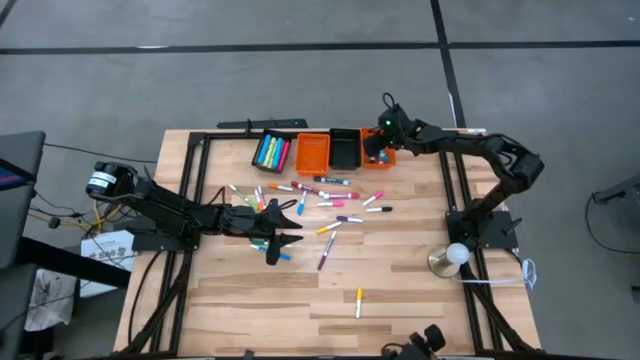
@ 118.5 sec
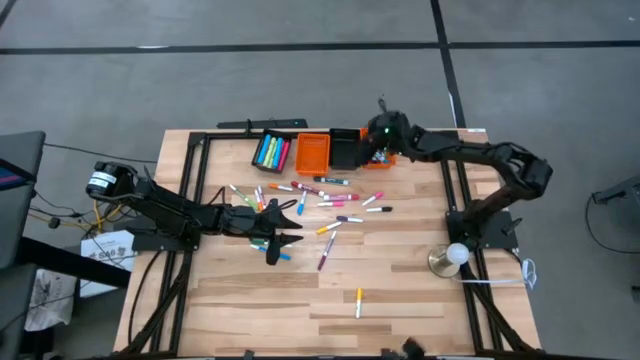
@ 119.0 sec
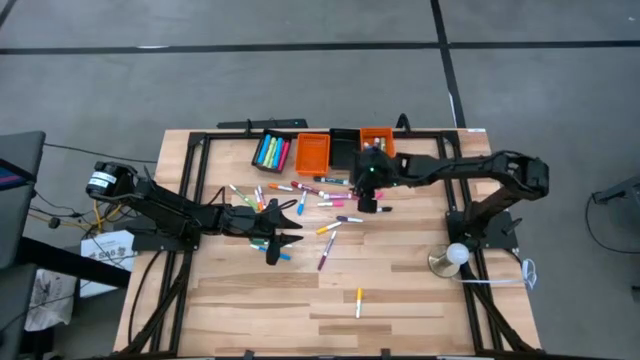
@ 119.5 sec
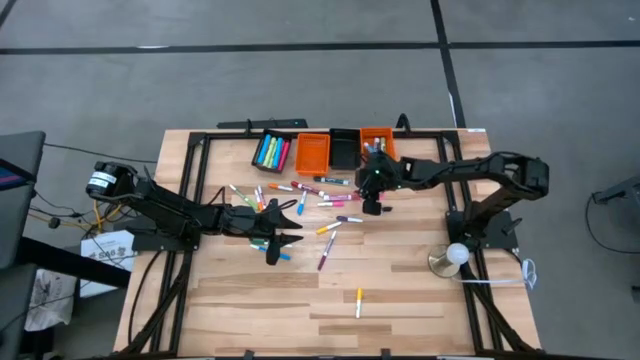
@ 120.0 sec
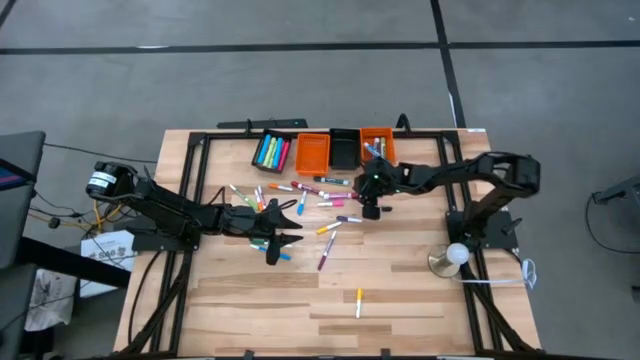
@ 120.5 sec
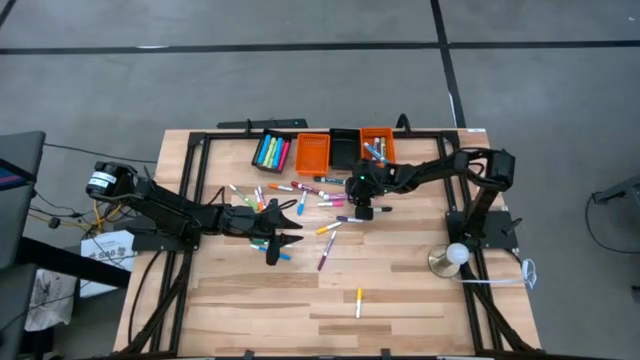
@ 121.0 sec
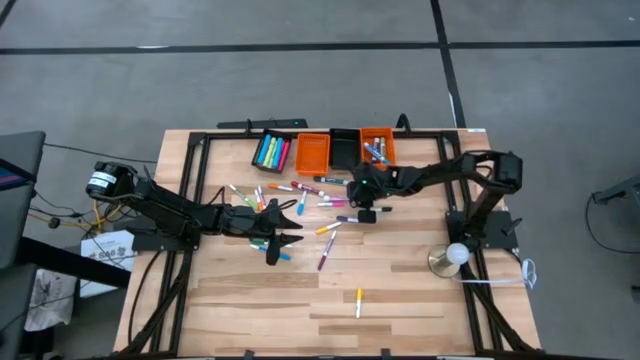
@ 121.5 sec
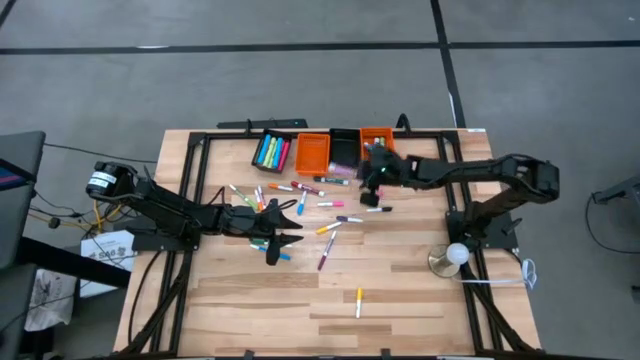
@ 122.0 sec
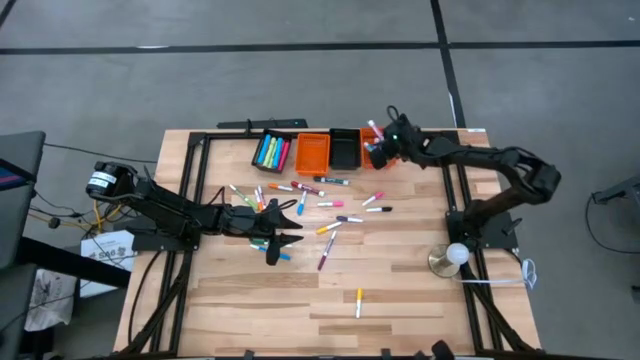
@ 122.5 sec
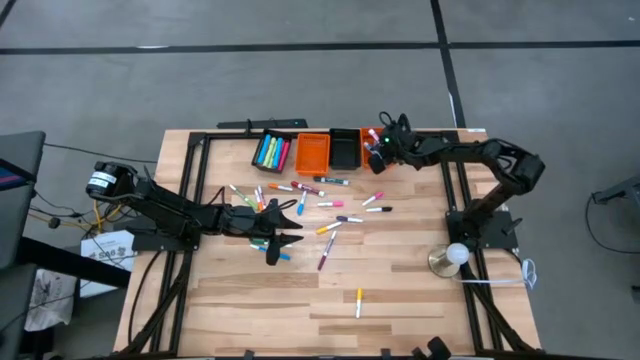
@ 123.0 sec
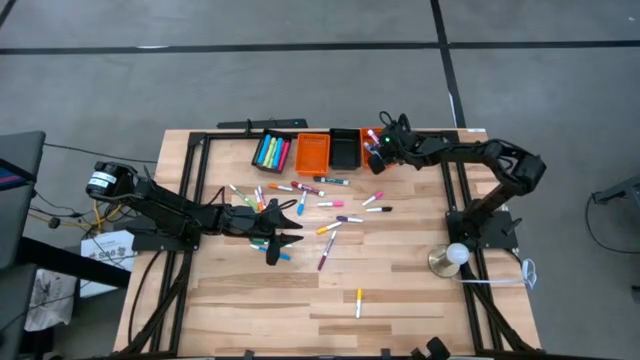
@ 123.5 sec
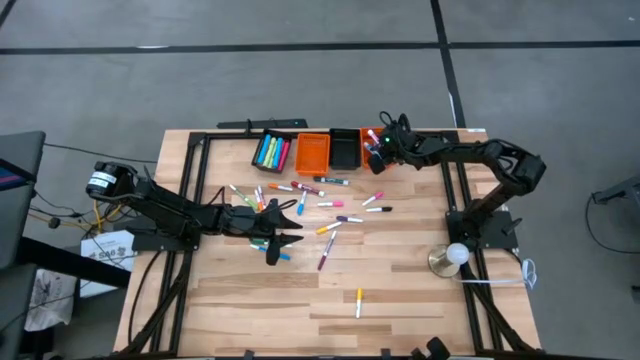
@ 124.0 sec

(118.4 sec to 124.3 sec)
Task: Pick & Place Markers
Put the big pink marker pen into the right orange basket

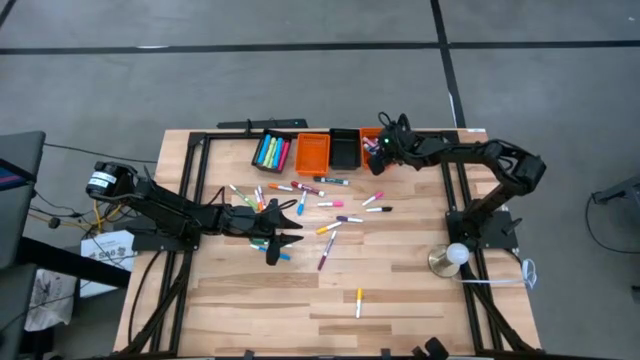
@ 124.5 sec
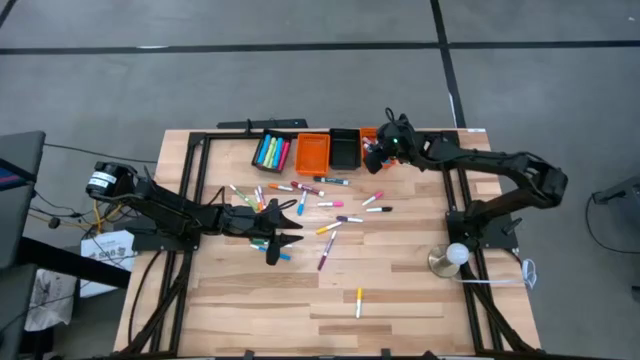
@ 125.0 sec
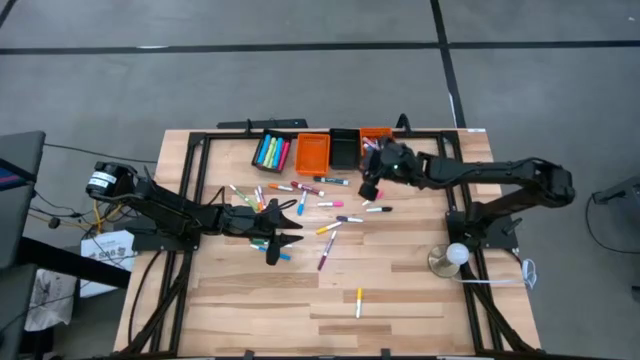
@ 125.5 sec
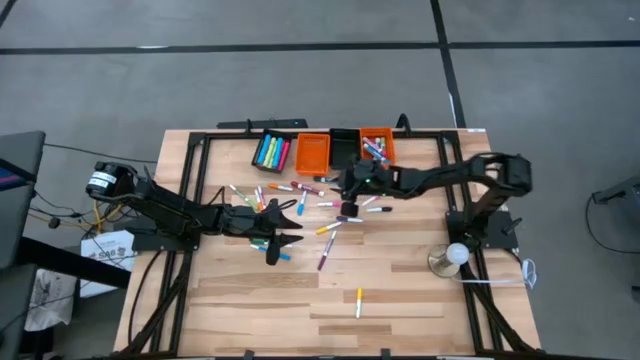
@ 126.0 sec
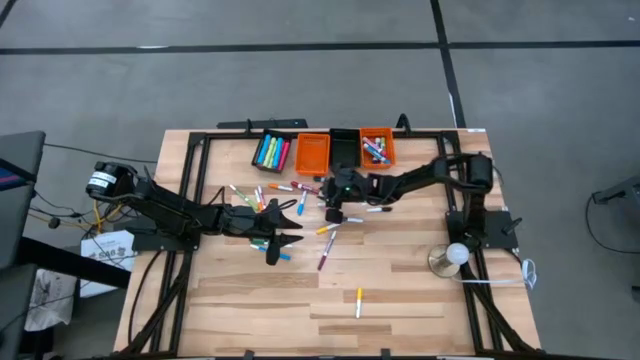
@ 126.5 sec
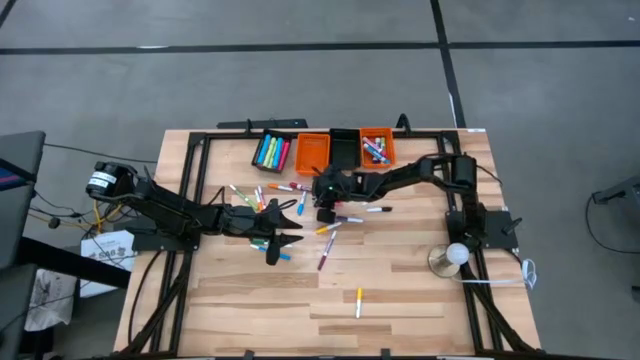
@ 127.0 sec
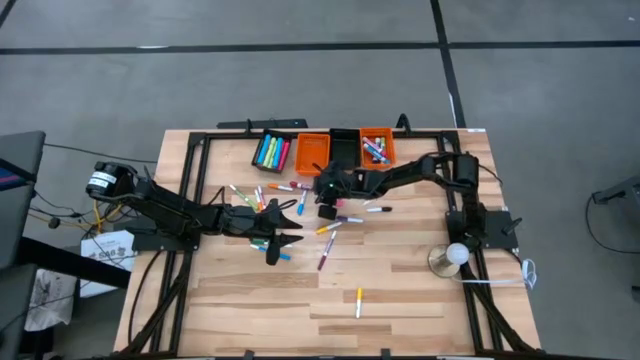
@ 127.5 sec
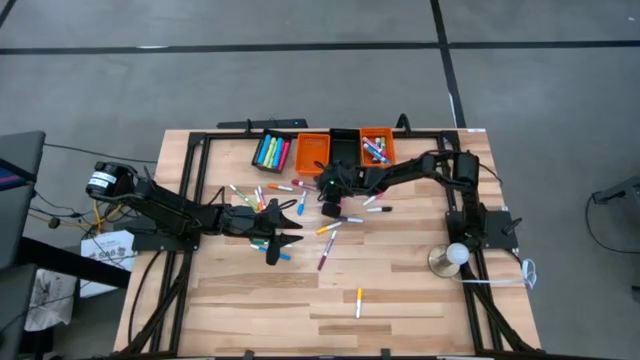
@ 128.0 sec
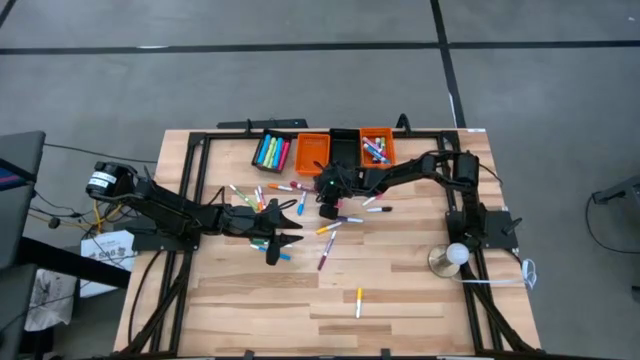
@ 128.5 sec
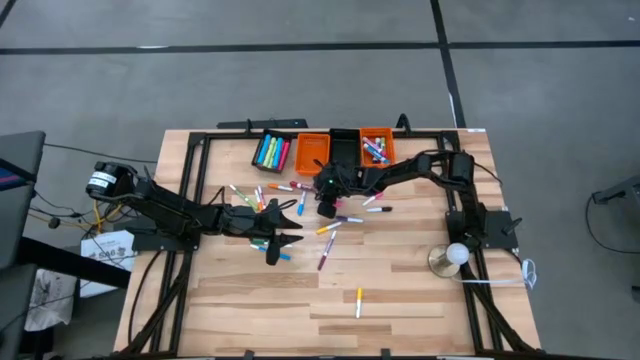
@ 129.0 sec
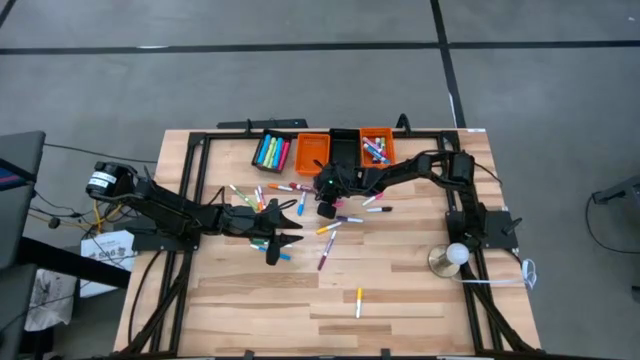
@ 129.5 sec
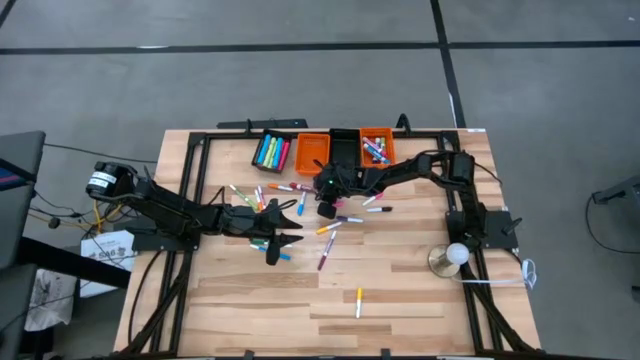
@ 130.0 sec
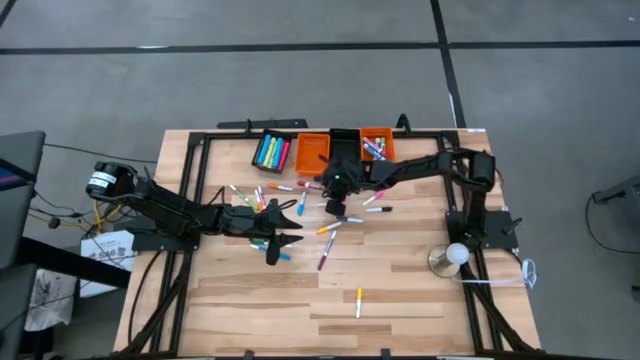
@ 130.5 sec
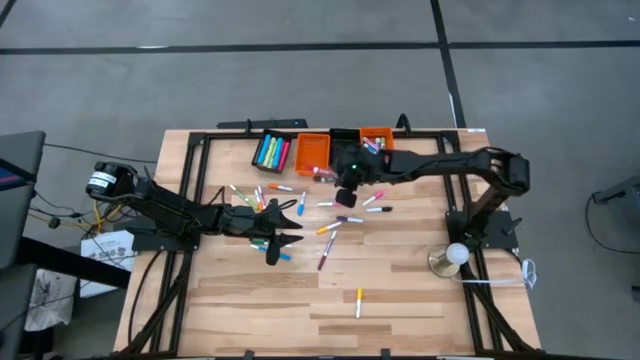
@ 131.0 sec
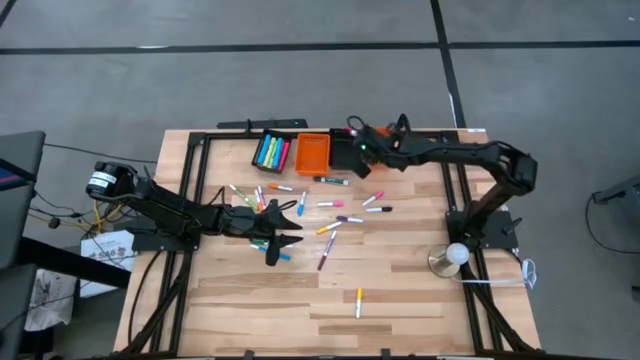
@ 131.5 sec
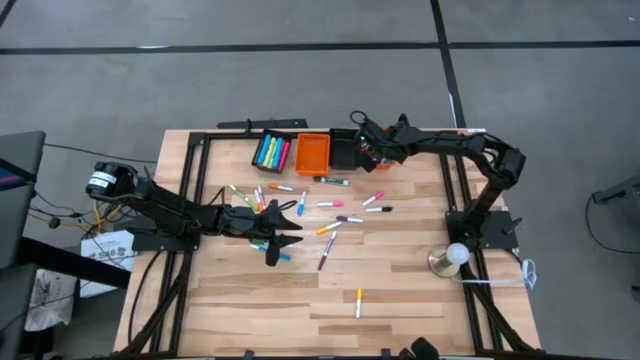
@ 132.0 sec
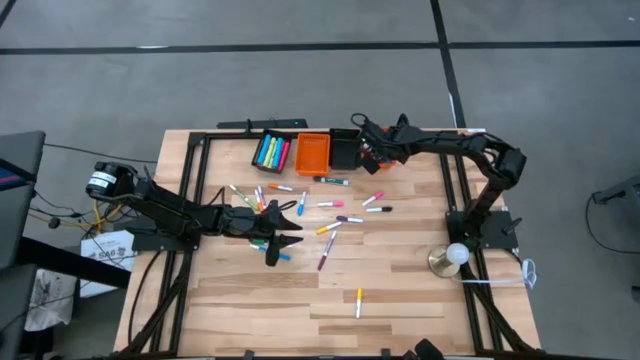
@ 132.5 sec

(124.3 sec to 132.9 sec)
Put the big red marker pen into the right orange basket

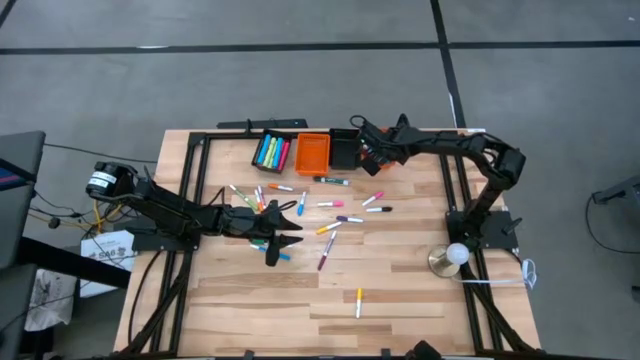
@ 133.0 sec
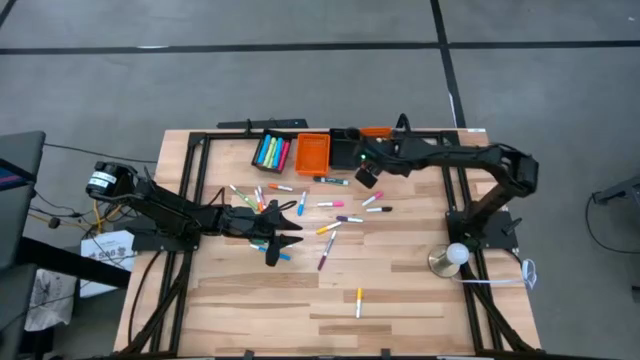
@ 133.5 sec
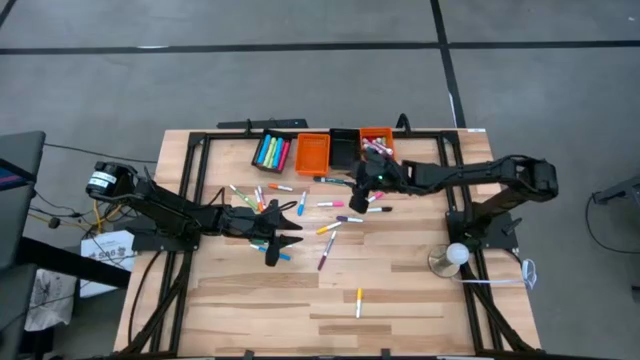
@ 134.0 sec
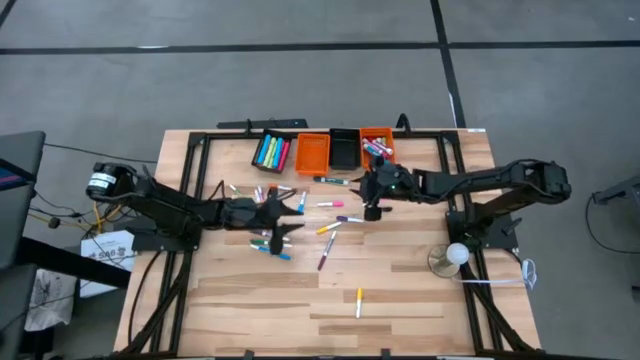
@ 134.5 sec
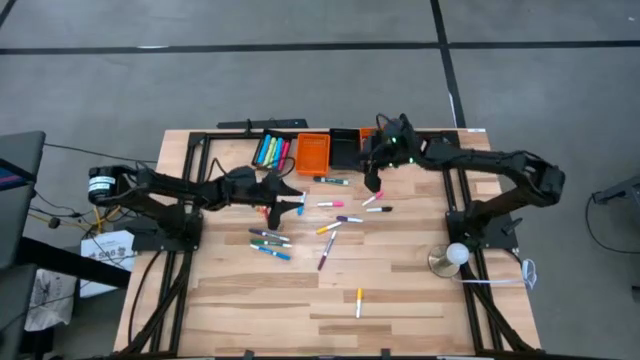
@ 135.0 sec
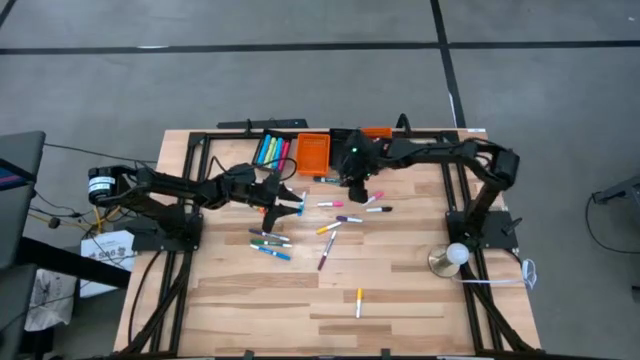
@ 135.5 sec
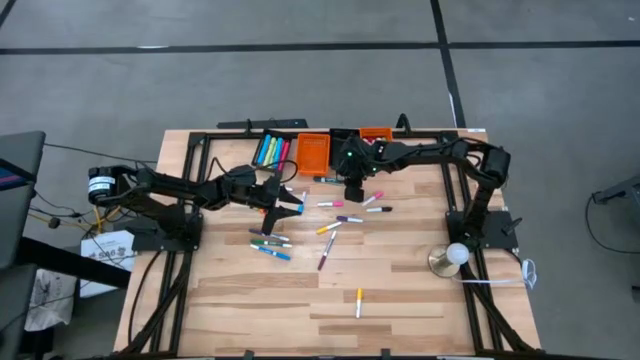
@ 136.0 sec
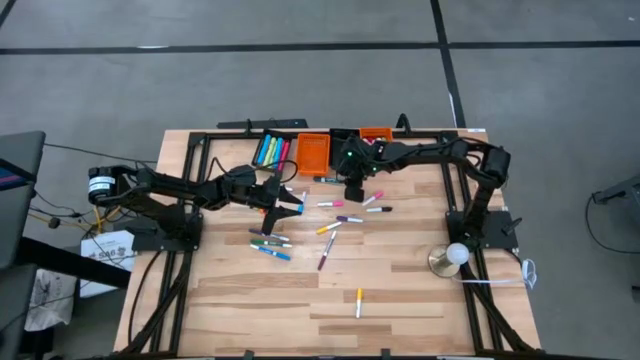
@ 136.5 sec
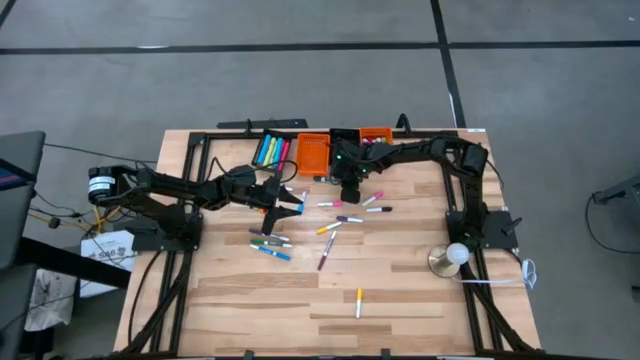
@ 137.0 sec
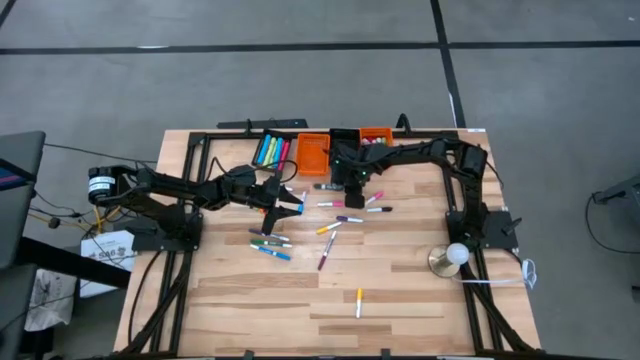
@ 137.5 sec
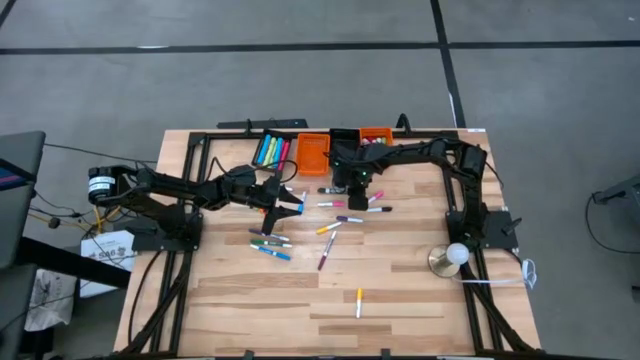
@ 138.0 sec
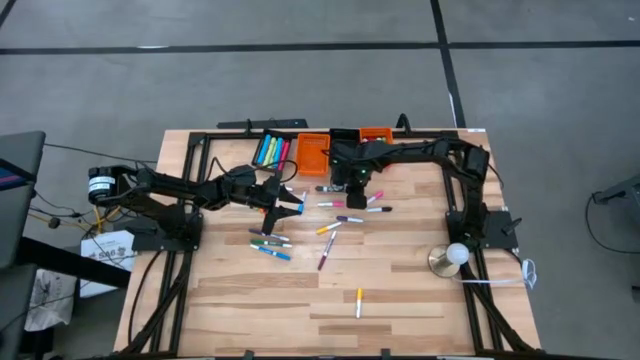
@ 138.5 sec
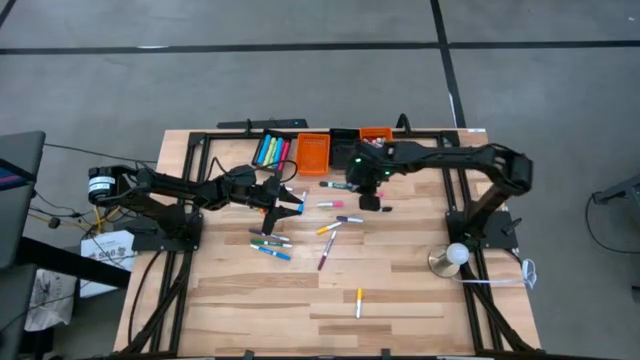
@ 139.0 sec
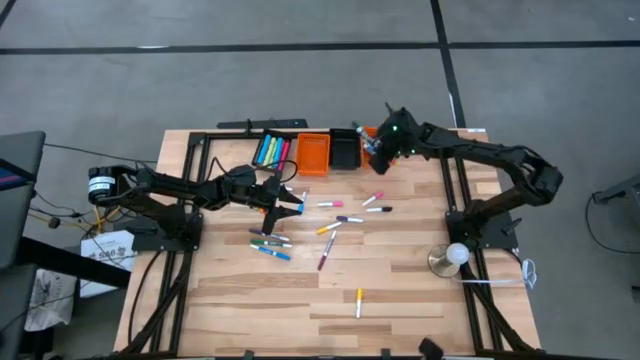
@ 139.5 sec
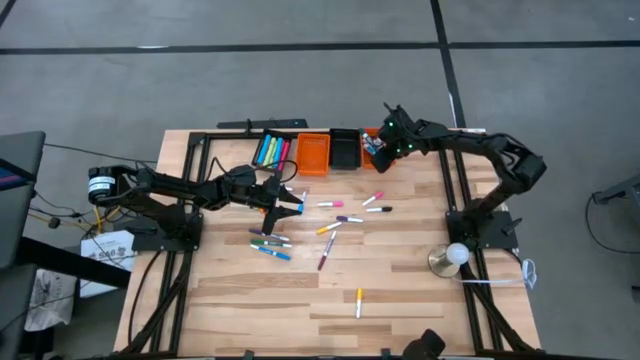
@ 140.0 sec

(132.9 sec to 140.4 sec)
Put the big green marker pen into the right orange basket
